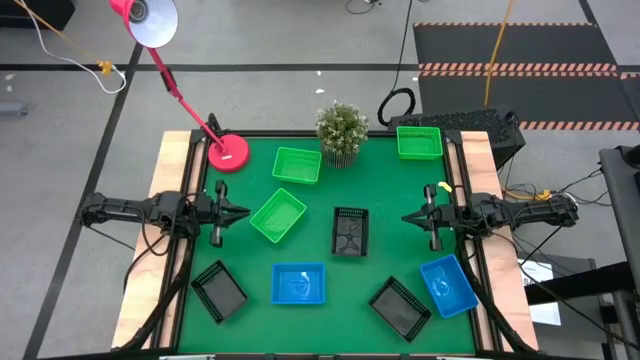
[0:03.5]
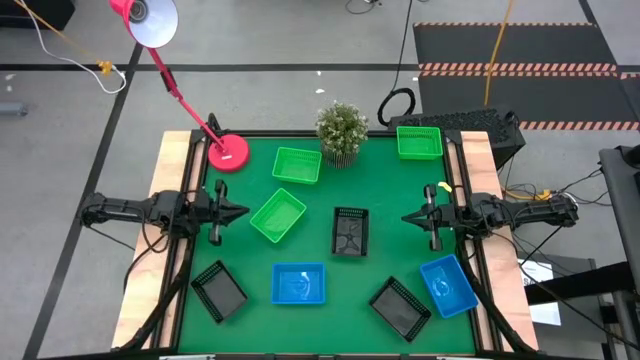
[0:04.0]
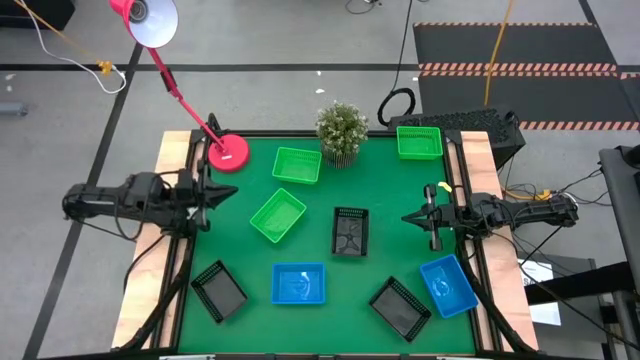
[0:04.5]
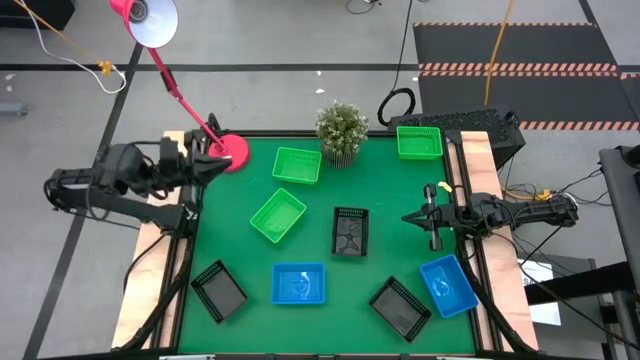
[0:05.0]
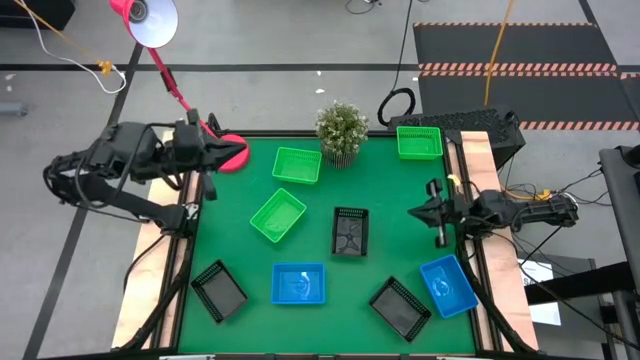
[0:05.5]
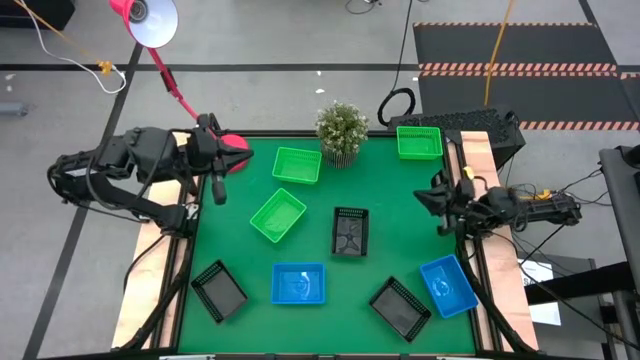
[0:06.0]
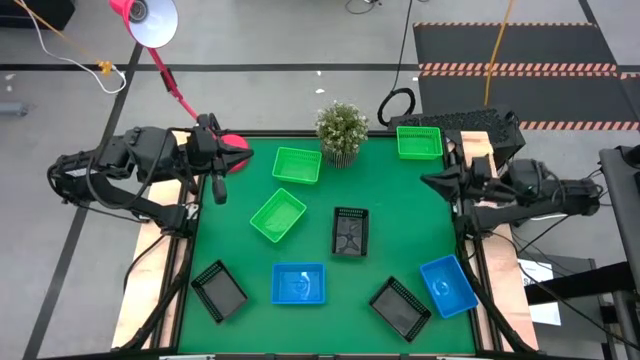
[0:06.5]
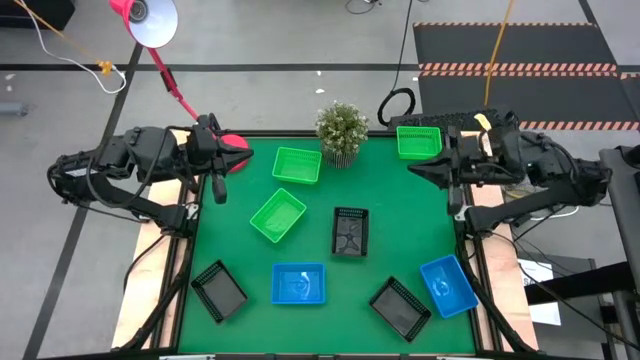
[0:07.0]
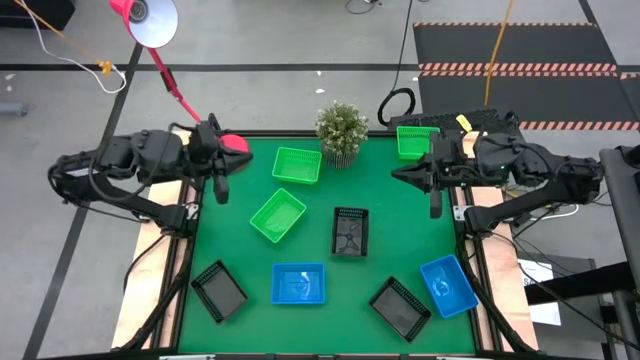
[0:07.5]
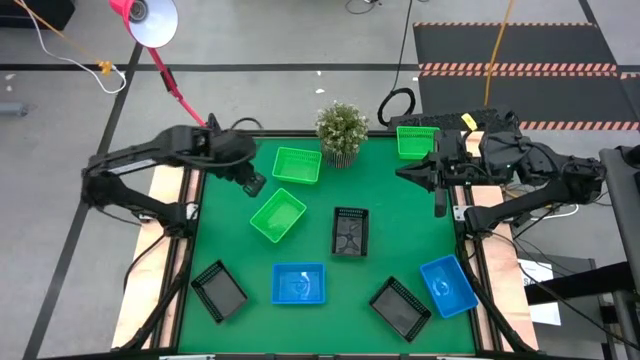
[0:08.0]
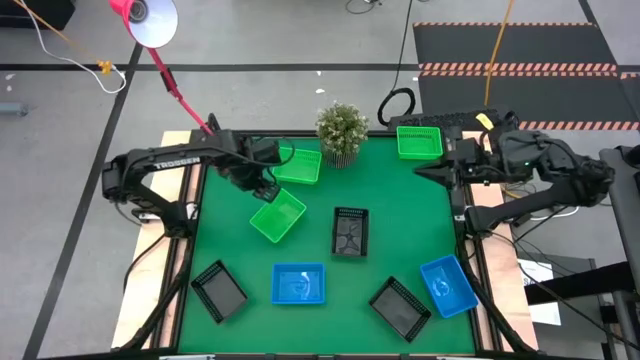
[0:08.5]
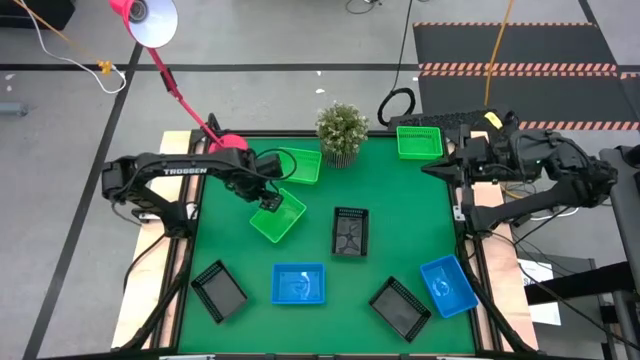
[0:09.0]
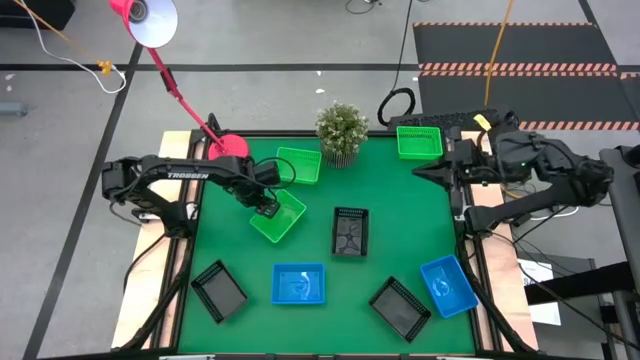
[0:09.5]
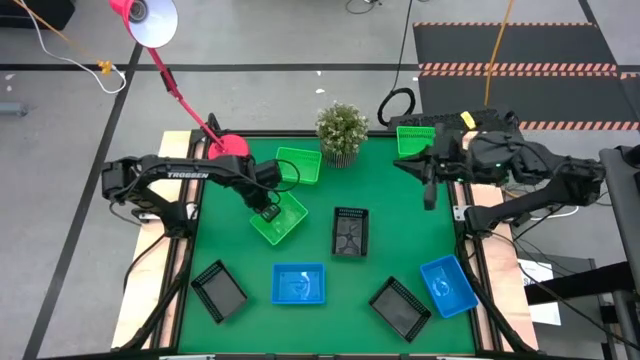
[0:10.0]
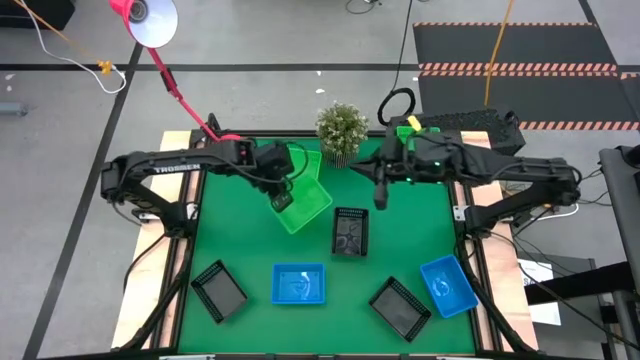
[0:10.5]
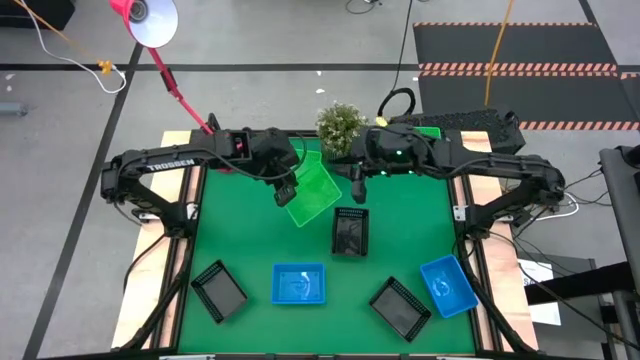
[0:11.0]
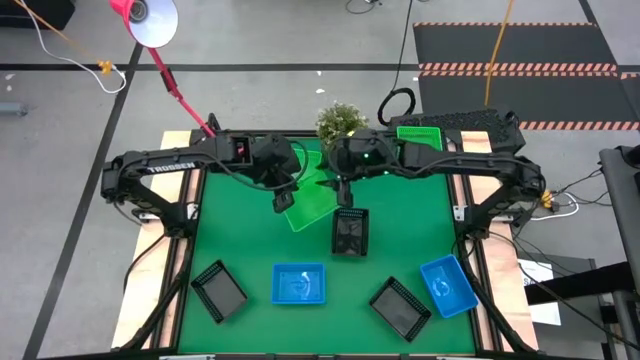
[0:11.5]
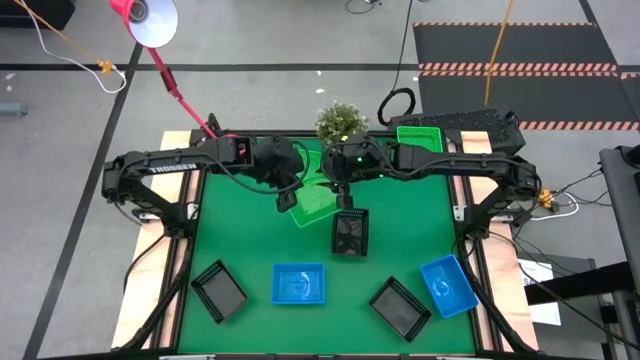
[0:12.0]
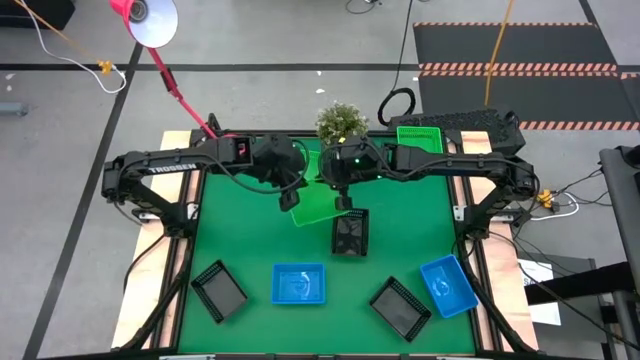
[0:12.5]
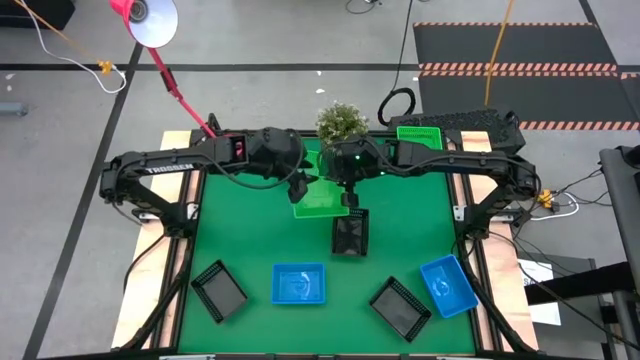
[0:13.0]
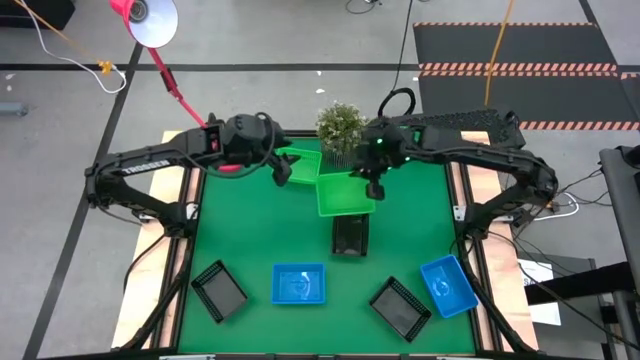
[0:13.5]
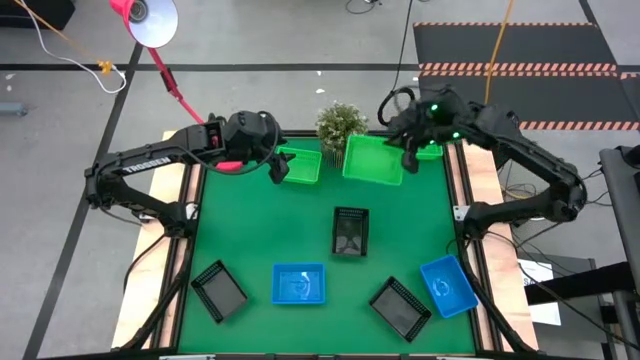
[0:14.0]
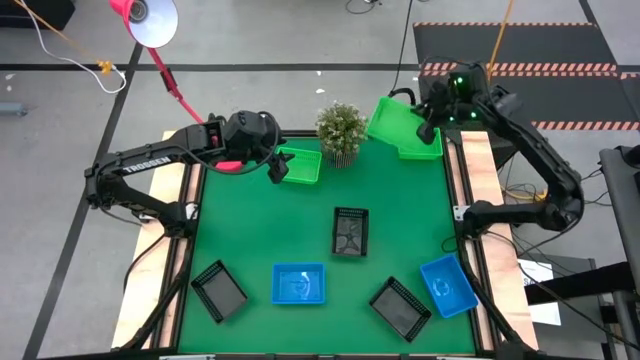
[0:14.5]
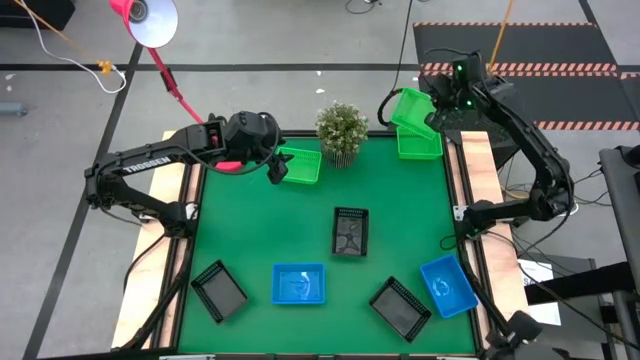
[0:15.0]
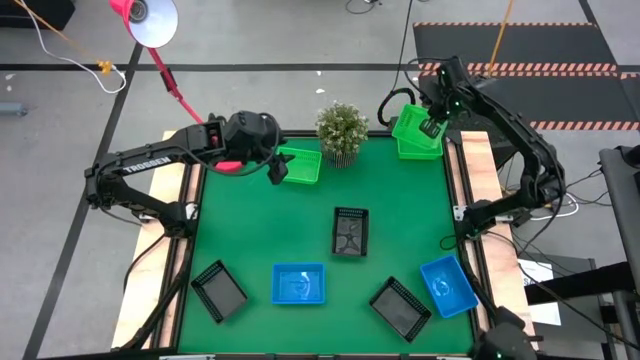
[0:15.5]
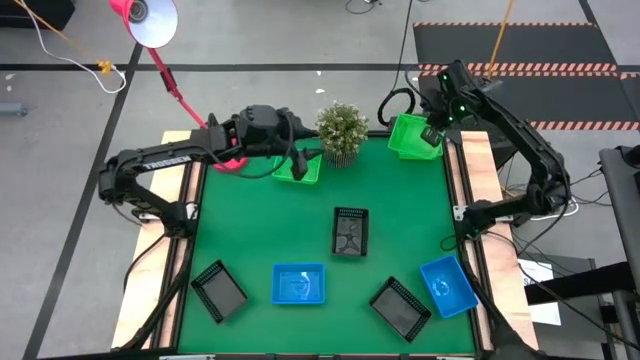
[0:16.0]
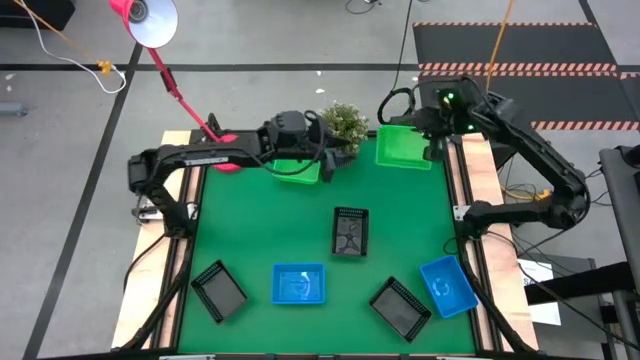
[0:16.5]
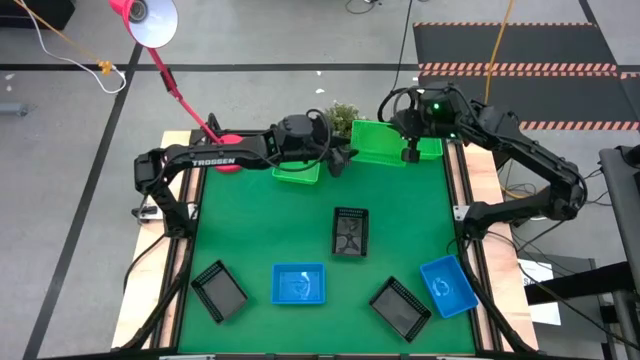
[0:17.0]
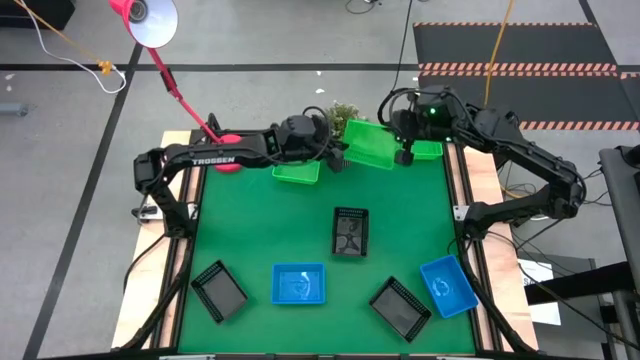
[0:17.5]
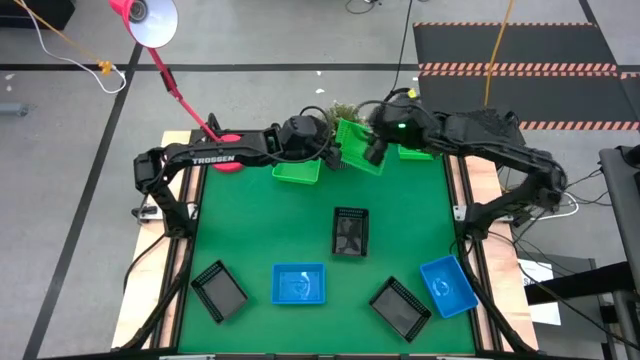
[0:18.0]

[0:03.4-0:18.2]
Stack the bottom left green bin on the top green bin

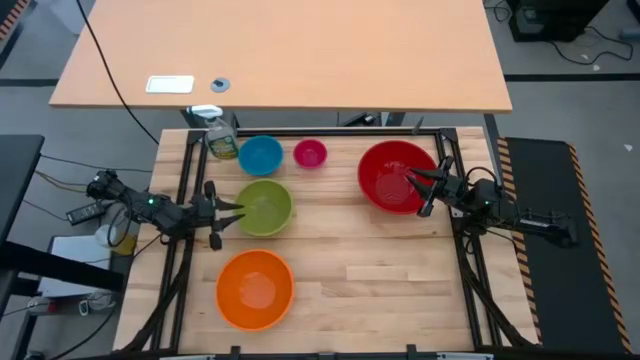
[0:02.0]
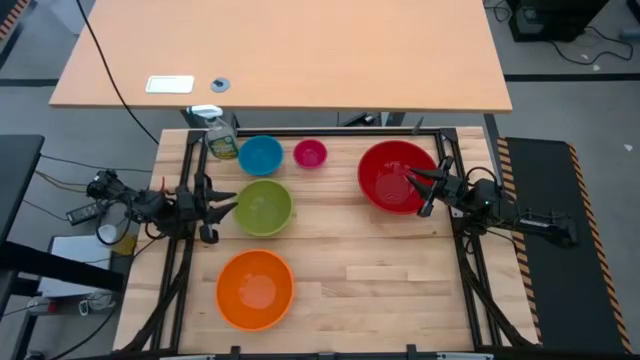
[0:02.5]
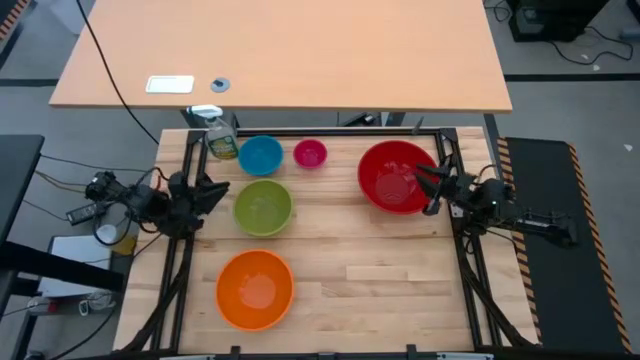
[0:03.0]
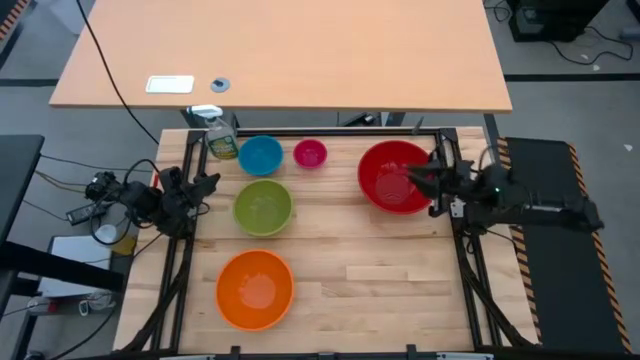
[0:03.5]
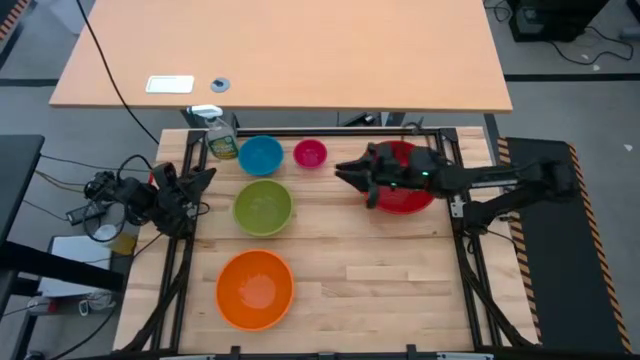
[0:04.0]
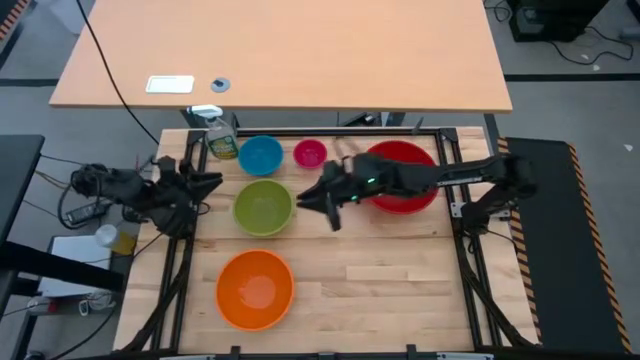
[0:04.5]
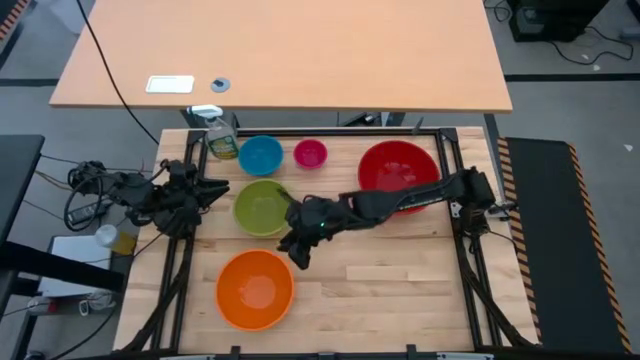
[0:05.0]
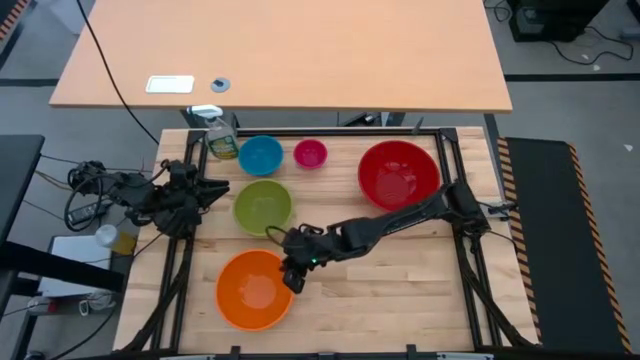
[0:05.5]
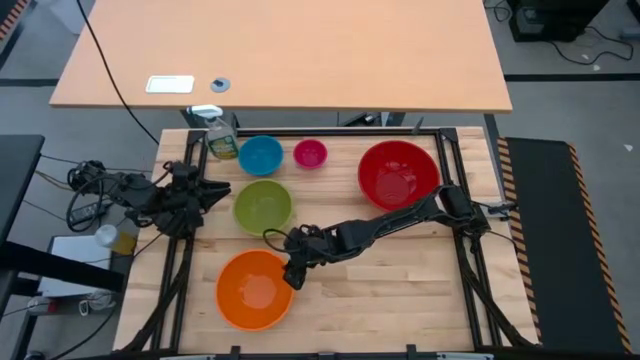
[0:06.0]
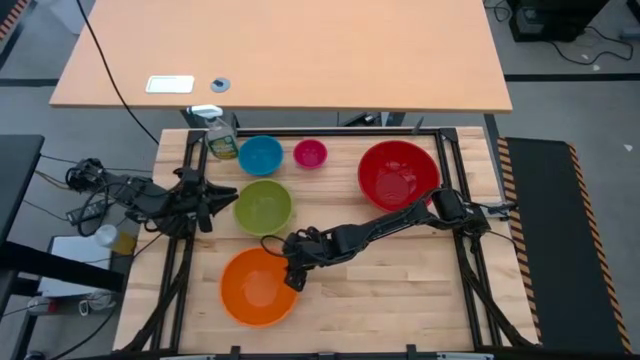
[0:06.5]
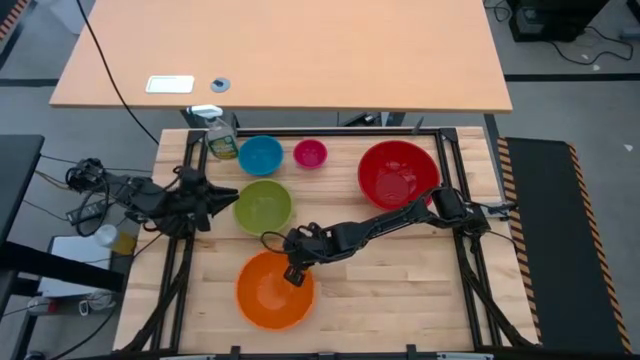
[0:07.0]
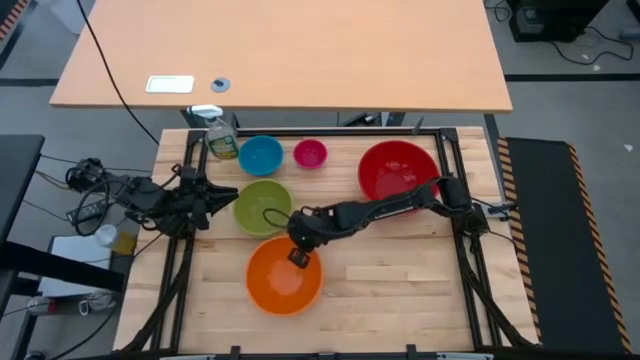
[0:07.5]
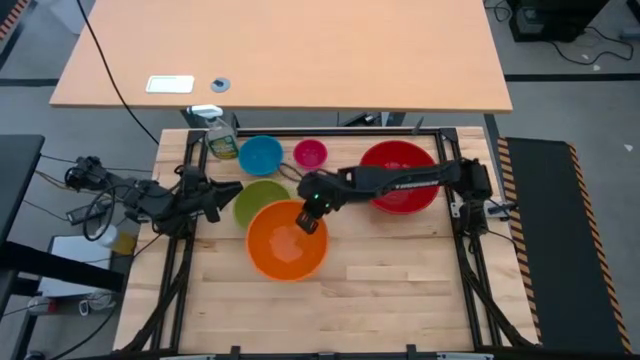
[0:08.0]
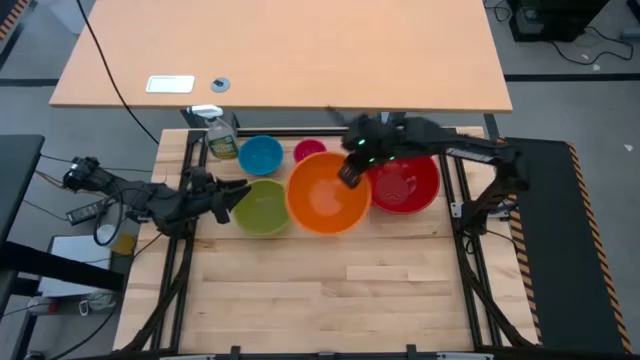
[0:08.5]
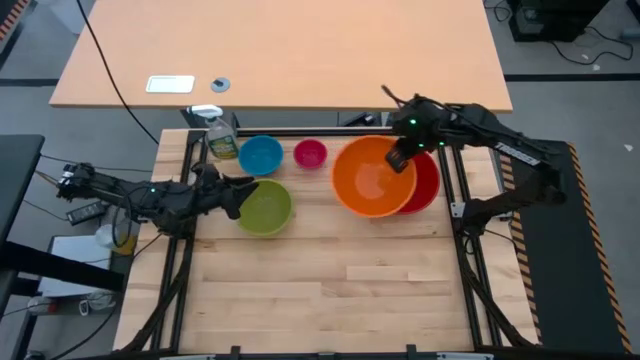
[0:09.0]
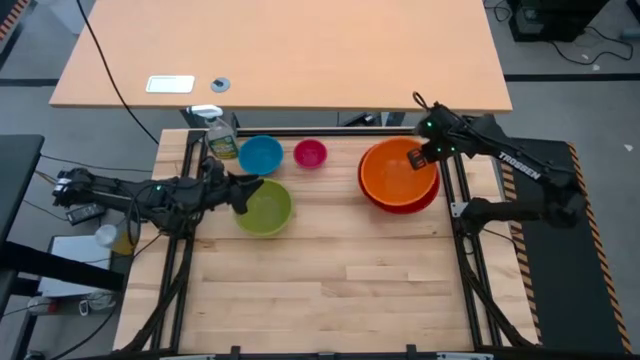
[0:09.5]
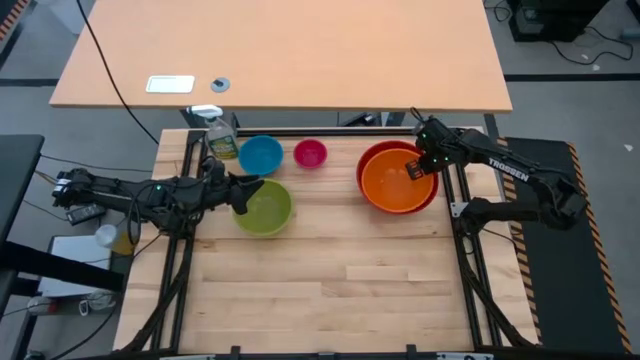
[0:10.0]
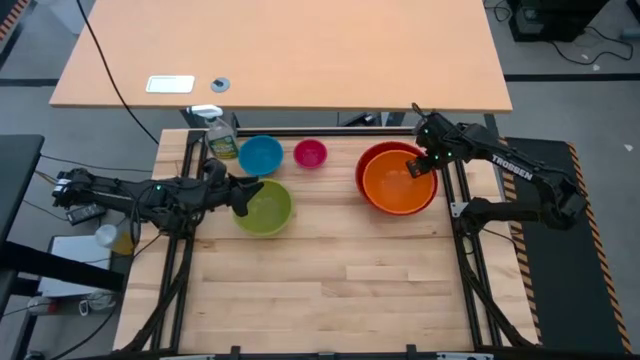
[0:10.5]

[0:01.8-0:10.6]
Stack the orange bowl on top of the red bowl
